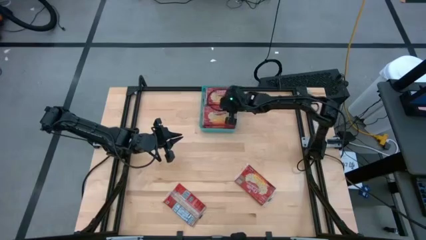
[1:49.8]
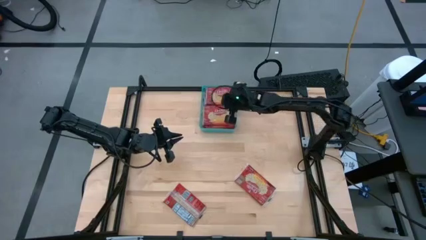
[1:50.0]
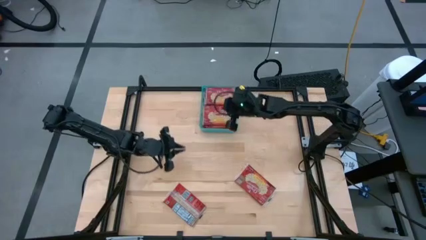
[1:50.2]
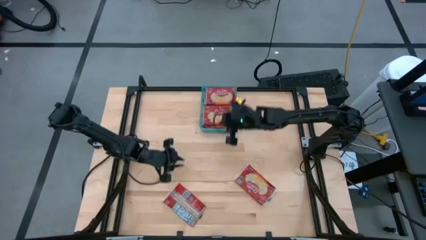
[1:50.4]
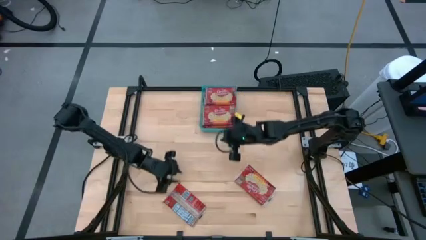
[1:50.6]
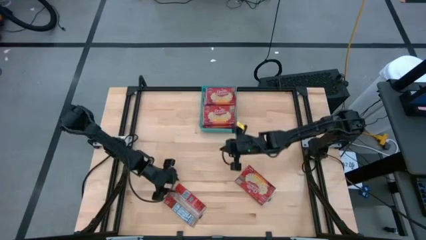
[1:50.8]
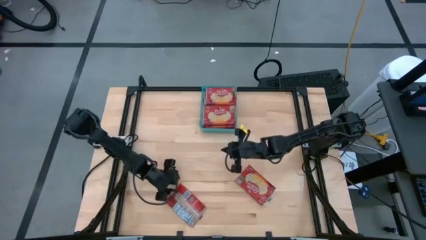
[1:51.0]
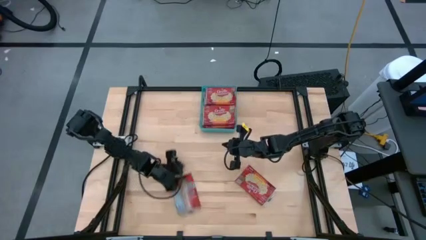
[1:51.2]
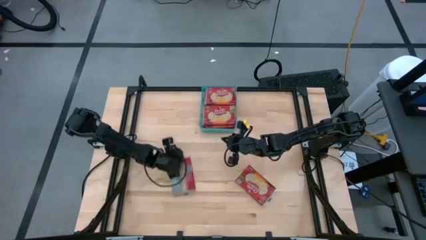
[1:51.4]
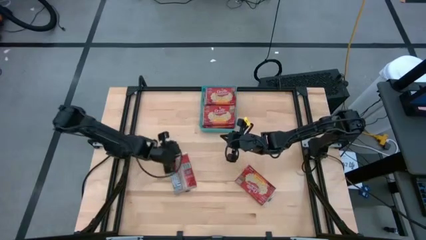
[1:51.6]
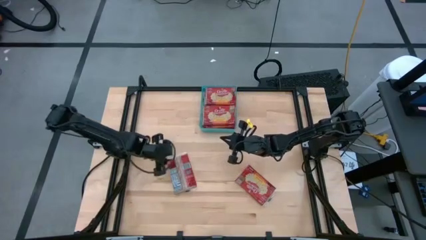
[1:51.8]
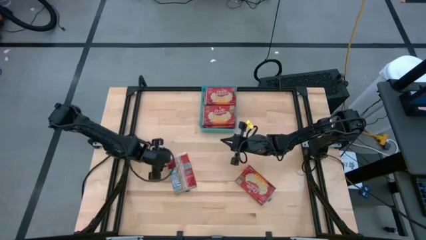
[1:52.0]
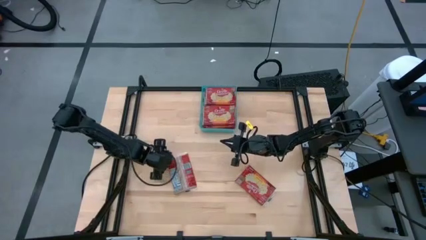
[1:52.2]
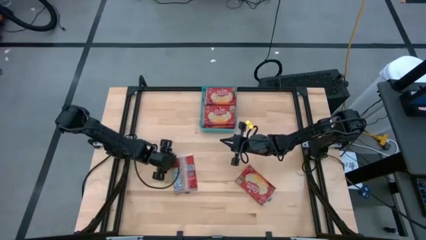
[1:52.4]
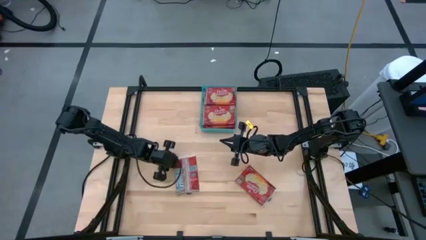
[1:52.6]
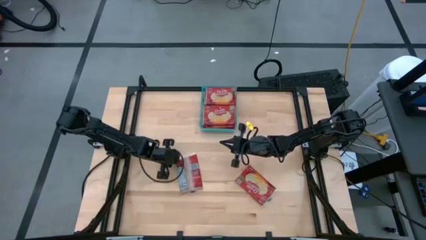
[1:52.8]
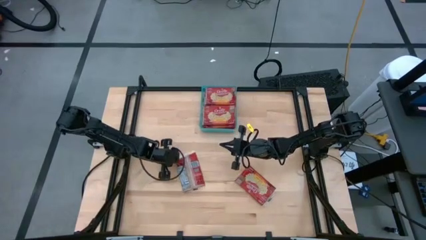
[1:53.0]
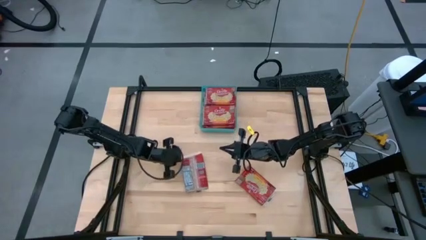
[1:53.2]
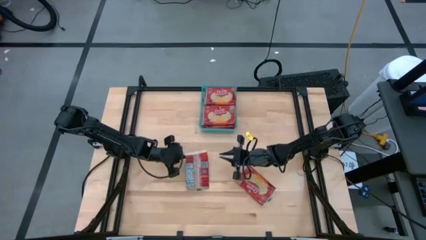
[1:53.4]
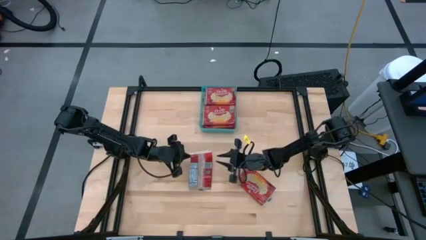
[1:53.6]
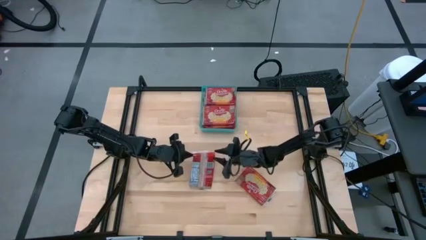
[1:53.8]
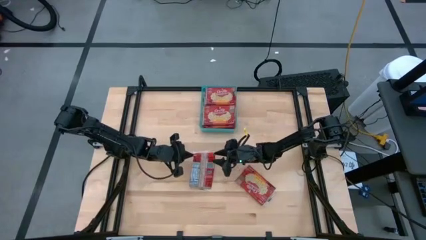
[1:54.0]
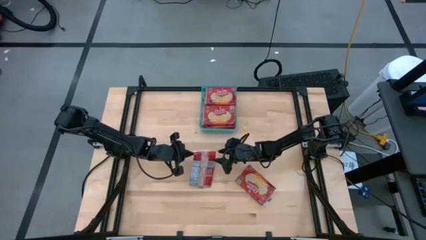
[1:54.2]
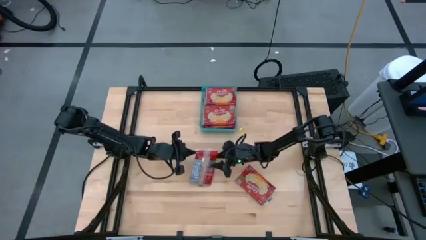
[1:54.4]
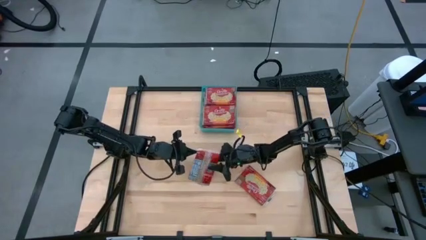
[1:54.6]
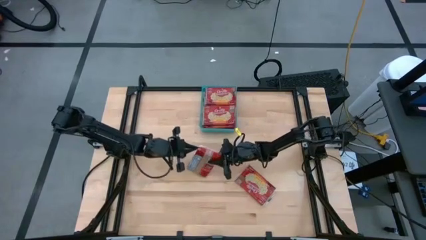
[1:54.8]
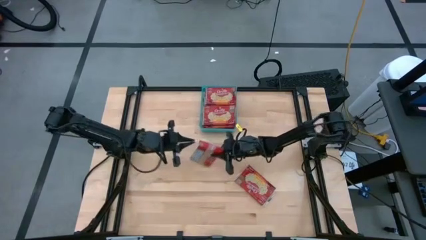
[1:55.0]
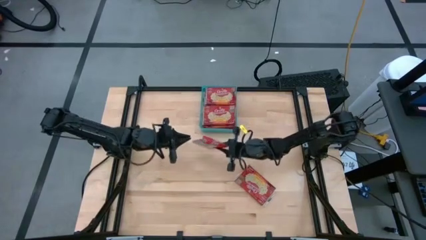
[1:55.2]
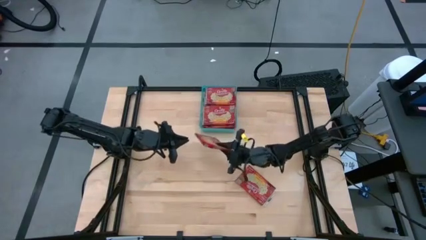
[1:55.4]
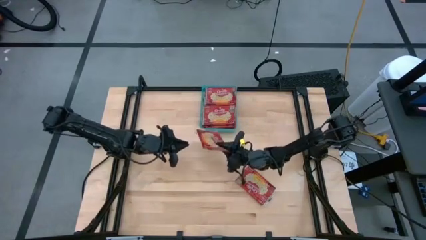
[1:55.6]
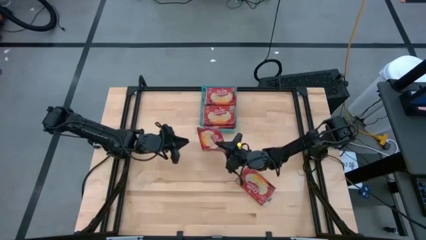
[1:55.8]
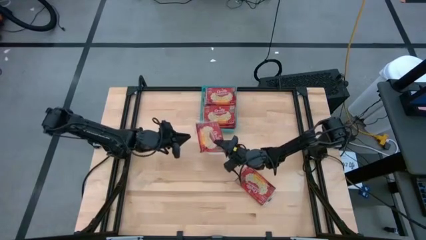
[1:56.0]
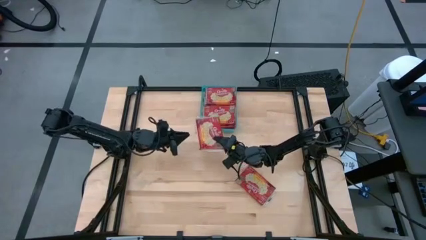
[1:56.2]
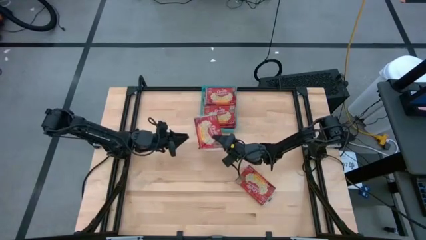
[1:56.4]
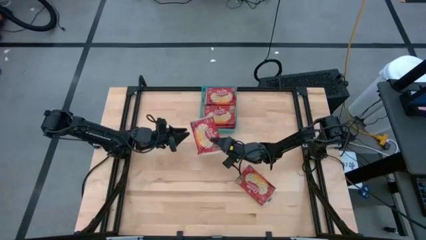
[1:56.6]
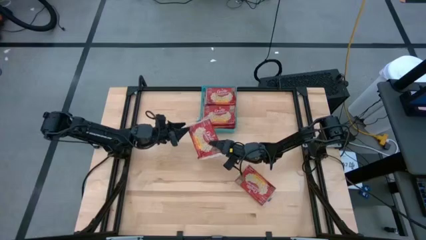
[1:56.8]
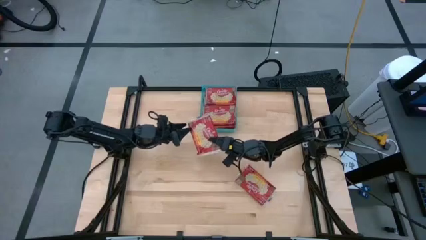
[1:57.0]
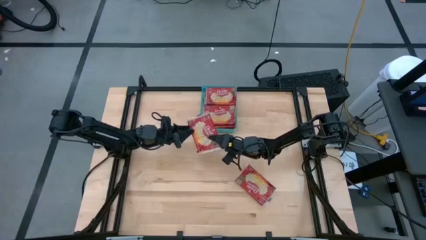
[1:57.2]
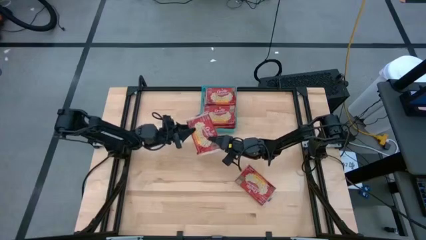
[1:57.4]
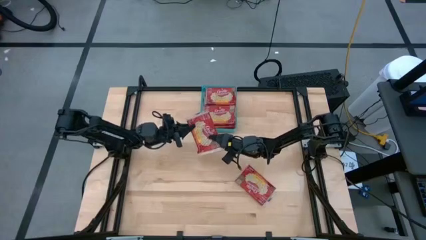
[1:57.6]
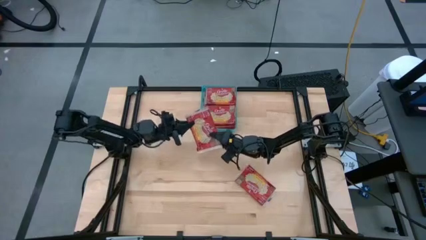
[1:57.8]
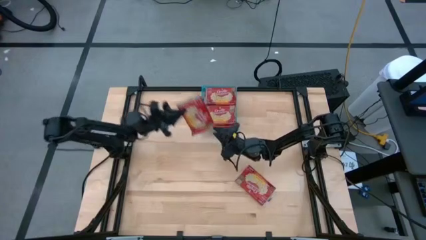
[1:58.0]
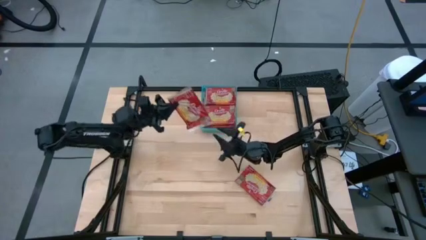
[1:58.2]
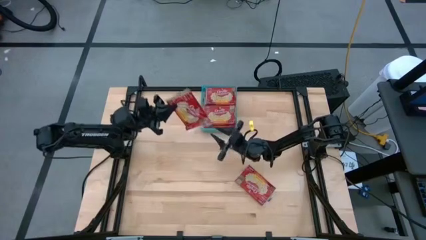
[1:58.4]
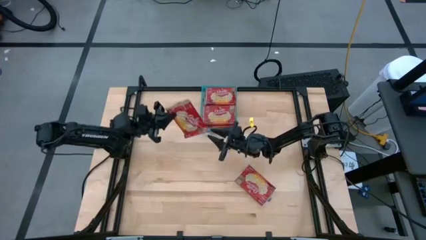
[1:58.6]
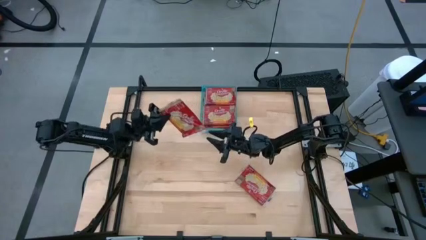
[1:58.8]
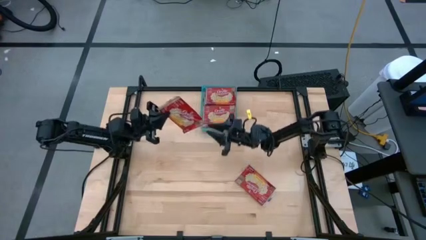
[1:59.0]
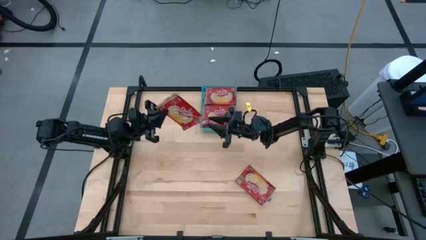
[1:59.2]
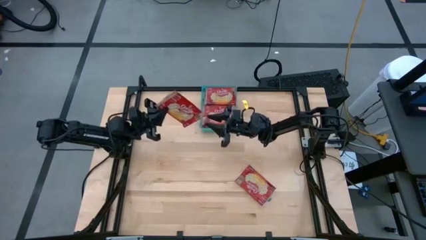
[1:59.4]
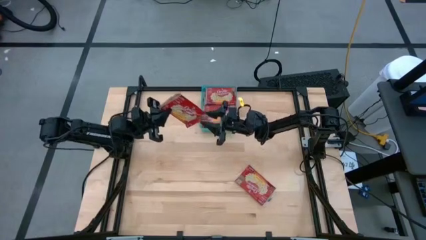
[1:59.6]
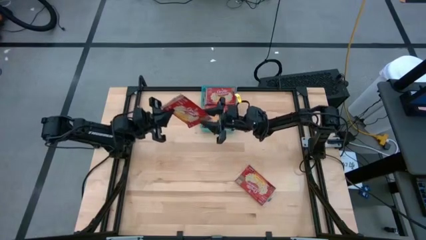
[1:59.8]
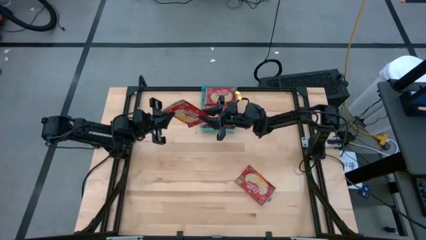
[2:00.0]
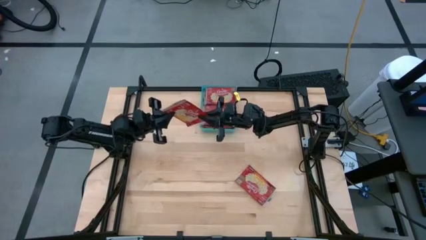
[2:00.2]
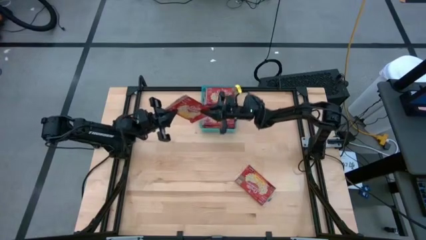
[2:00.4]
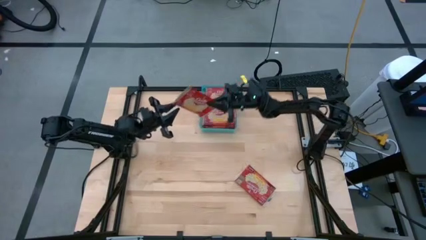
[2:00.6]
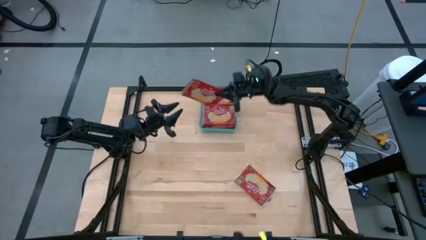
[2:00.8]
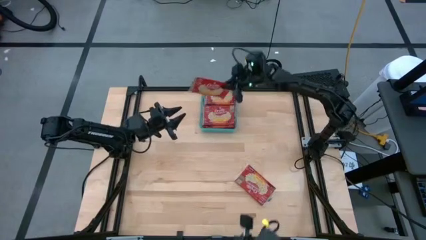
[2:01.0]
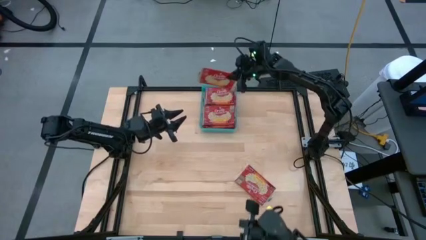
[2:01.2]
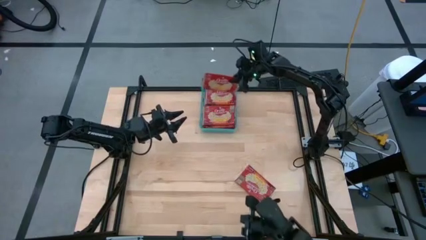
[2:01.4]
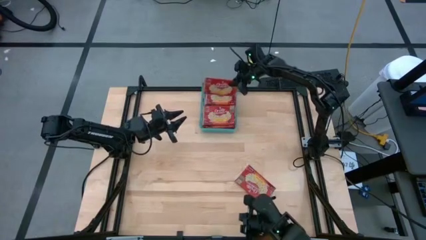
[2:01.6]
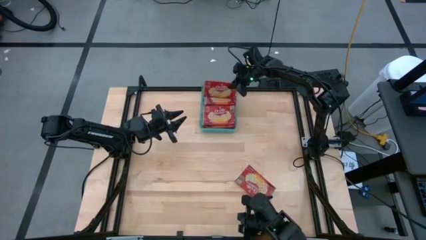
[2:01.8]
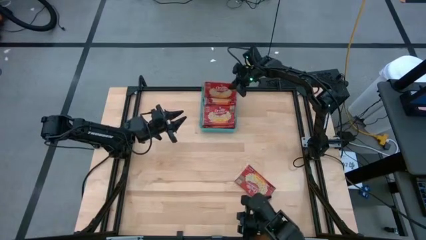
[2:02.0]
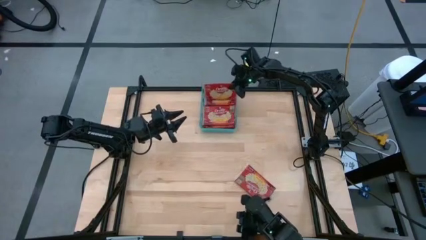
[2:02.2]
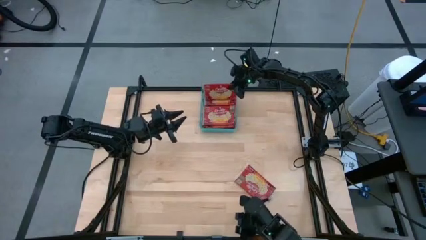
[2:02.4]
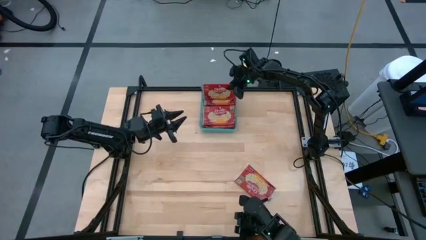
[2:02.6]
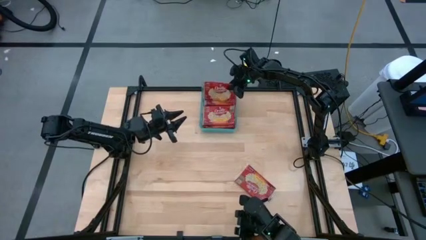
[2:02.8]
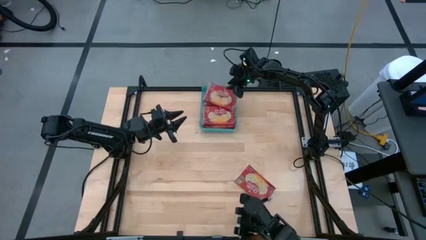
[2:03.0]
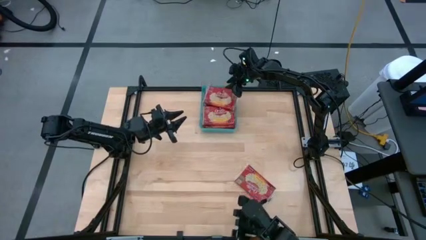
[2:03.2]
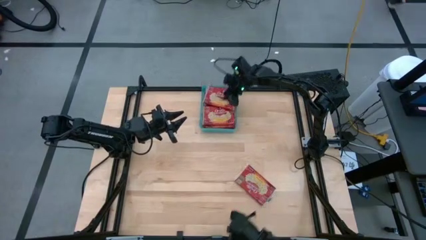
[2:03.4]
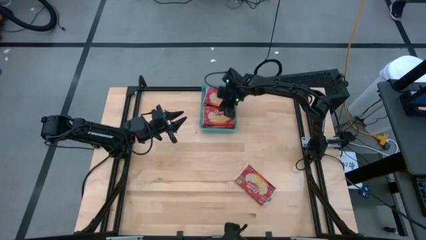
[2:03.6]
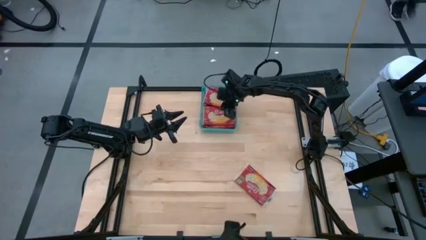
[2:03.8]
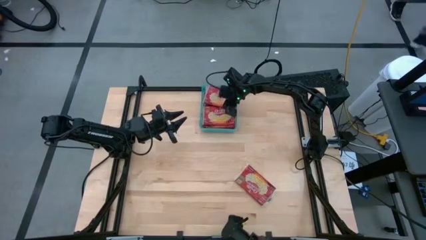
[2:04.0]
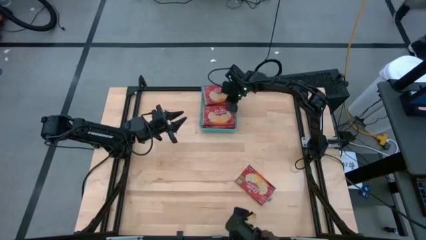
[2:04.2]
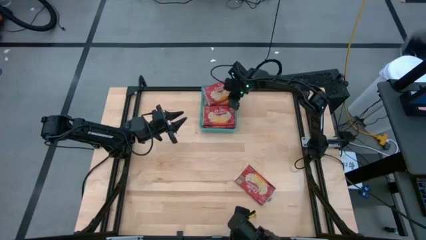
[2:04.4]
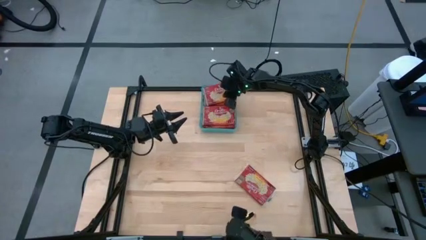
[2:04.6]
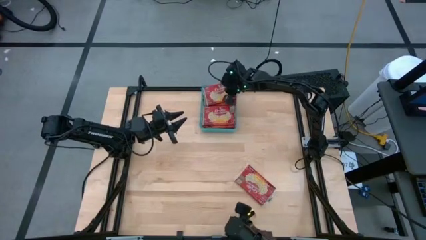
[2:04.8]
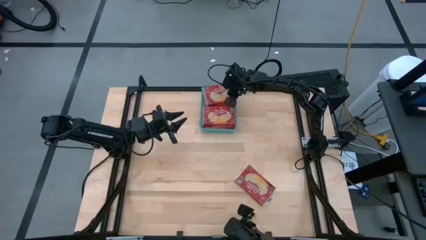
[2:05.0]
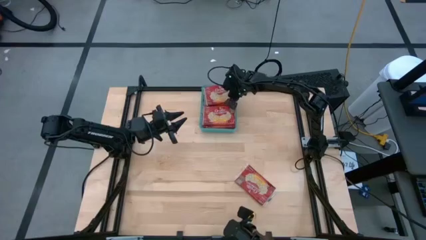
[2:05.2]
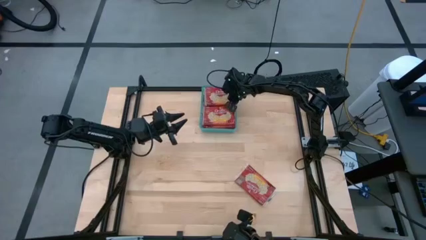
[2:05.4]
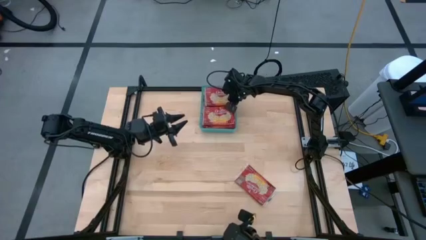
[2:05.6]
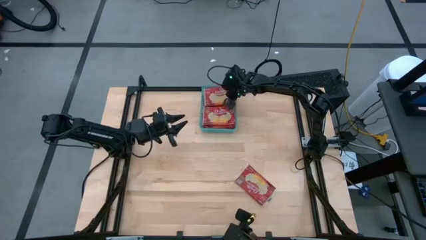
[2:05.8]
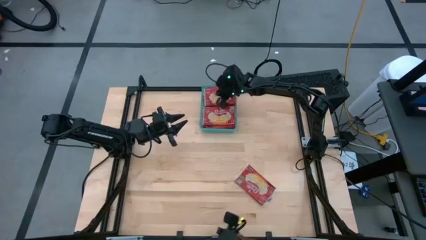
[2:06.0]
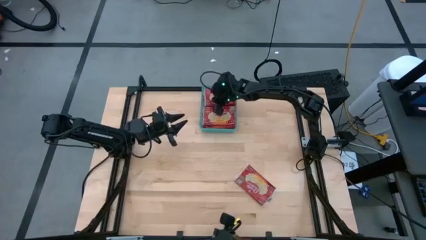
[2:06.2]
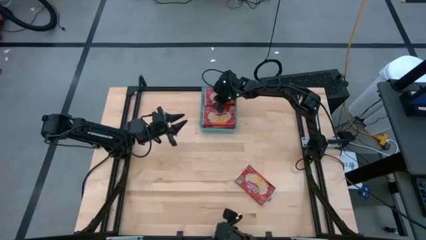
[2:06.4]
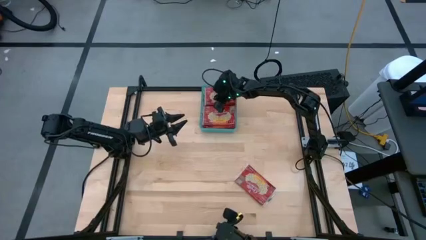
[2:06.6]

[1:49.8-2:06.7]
Task: Sort popcorn bags into baskets
Put the red popcorn bag into the blue bin
